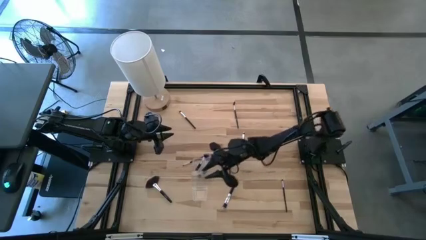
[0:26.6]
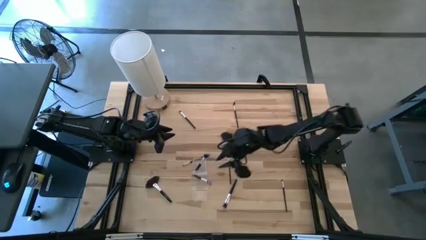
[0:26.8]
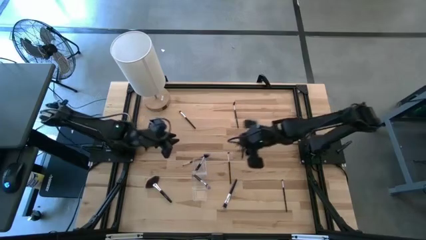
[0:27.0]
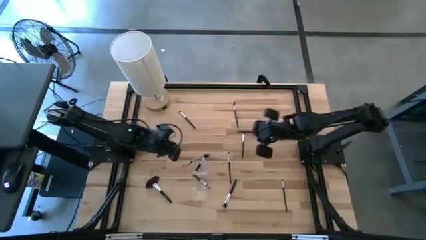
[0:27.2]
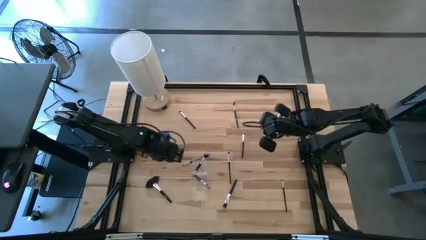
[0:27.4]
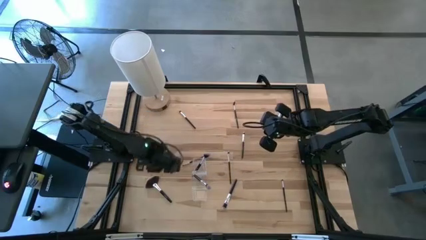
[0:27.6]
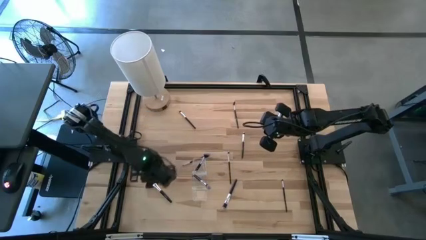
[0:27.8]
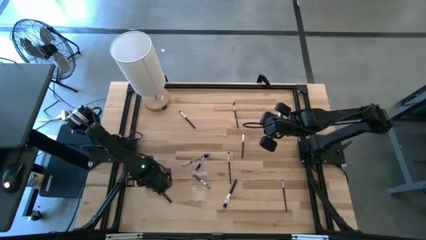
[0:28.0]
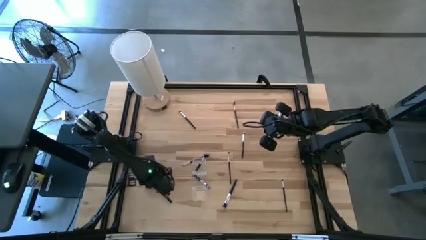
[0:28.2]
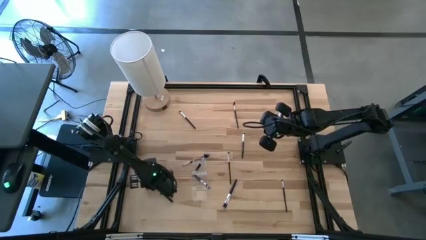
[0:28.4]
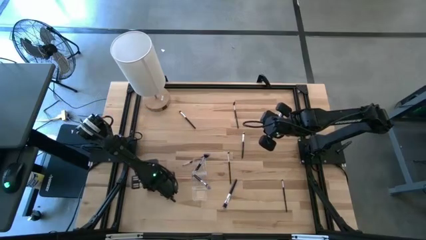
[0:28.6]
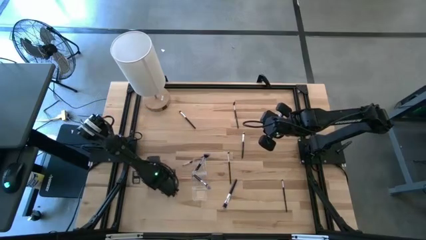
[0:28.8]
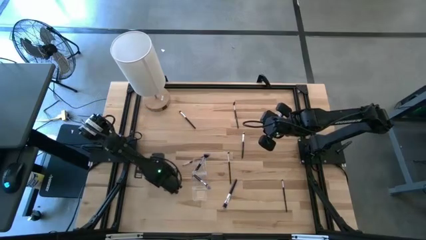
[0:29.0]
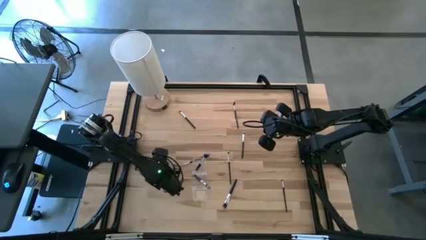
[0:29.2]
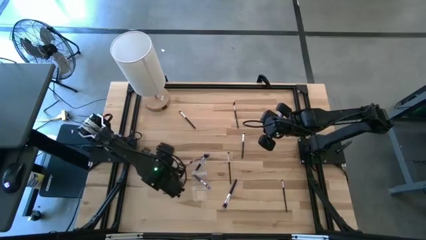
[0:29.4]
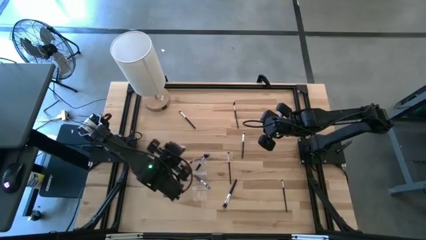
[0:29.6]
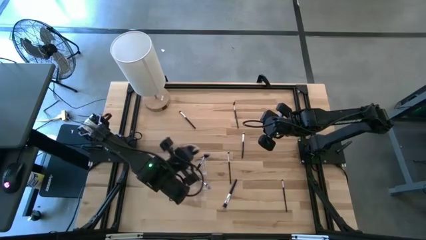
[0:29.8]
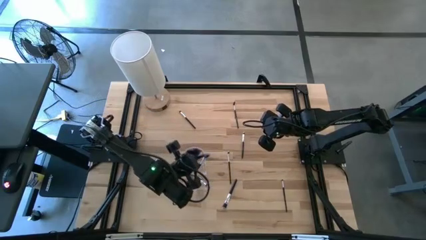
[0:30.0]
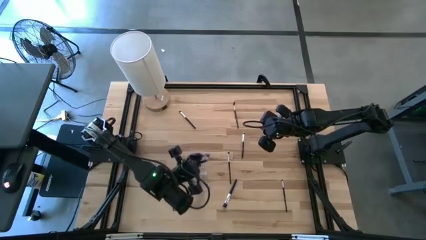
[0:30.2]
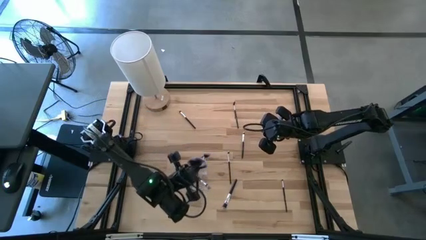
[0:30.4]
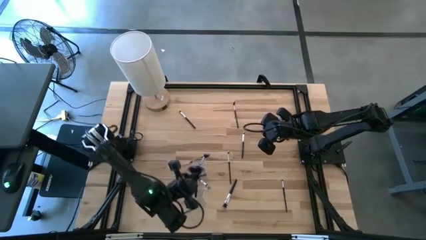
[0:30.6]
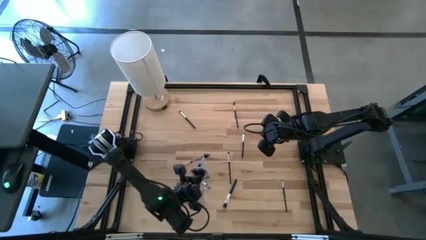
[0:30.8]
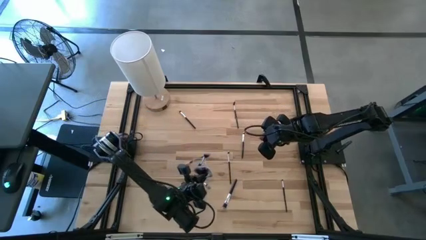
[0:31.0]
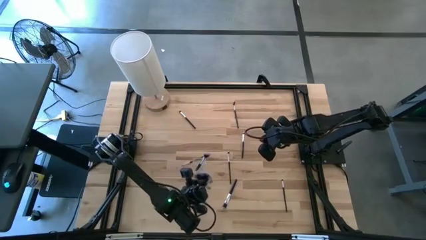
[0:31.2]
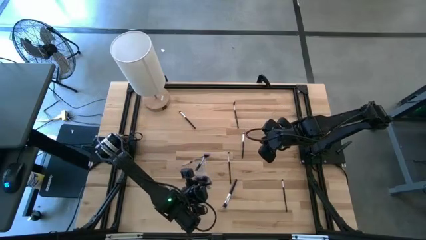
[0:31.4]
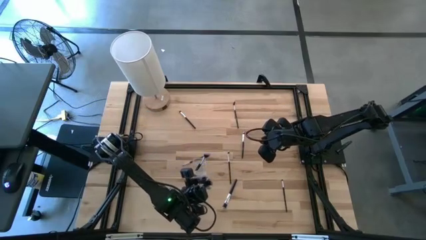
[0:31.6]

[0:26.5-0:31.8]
Task: Put items in baskets/containers
Put the highlighter brush into the transparent organizer

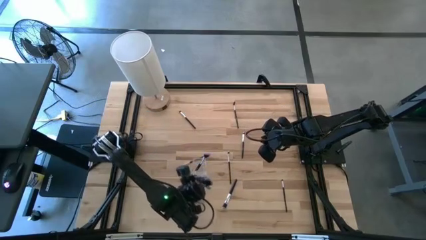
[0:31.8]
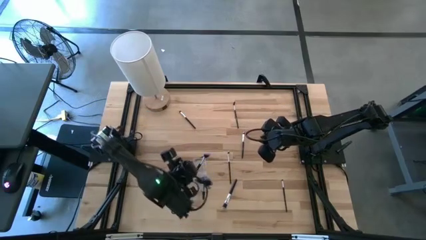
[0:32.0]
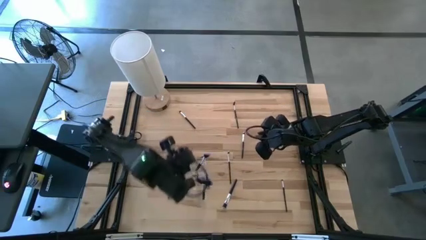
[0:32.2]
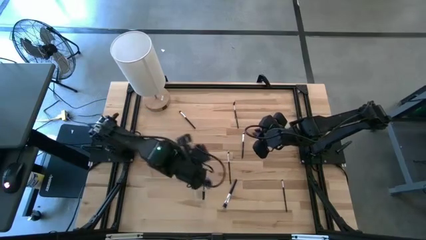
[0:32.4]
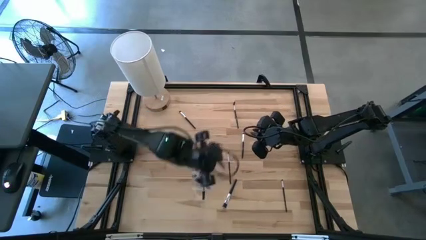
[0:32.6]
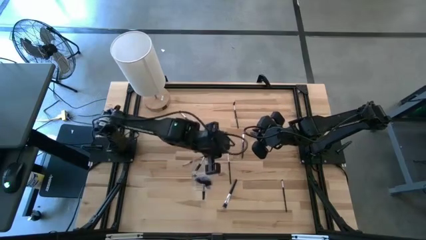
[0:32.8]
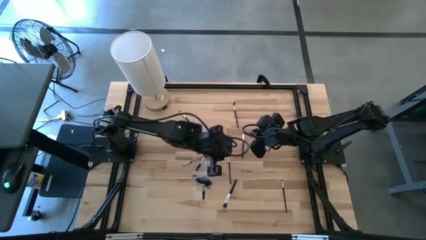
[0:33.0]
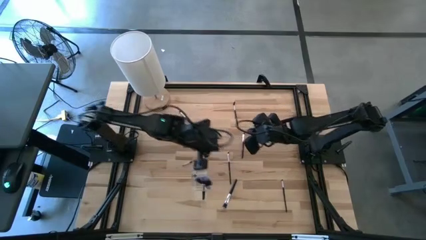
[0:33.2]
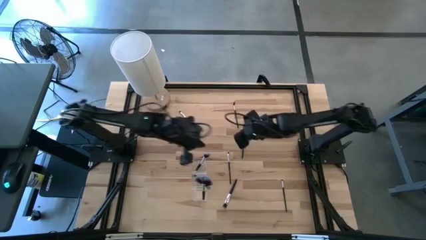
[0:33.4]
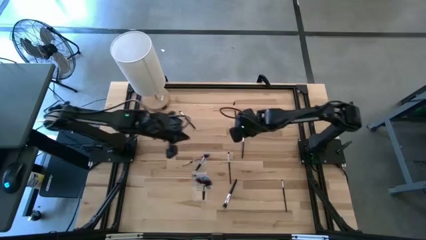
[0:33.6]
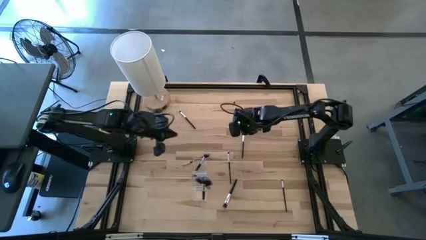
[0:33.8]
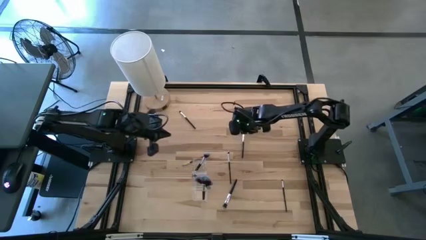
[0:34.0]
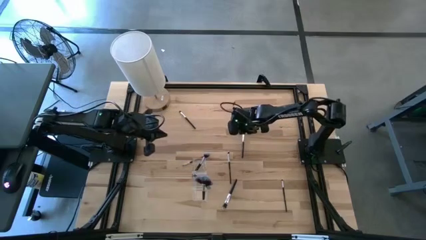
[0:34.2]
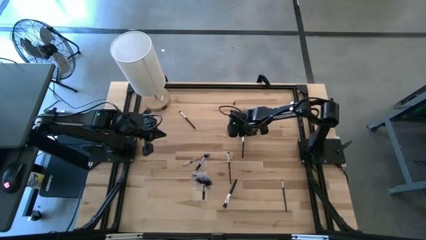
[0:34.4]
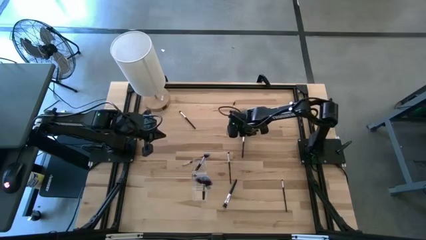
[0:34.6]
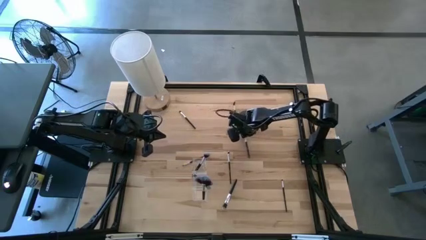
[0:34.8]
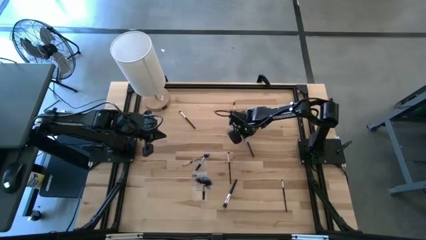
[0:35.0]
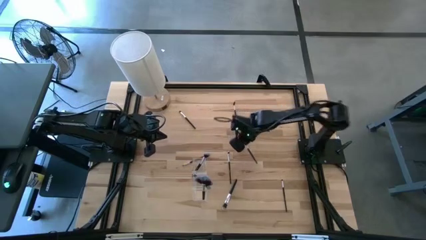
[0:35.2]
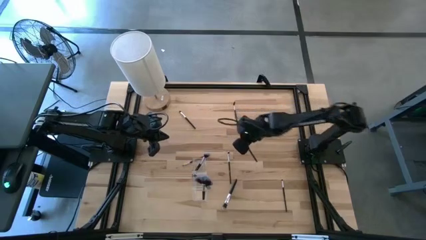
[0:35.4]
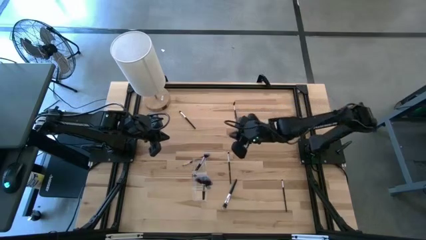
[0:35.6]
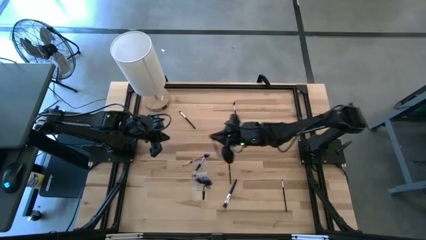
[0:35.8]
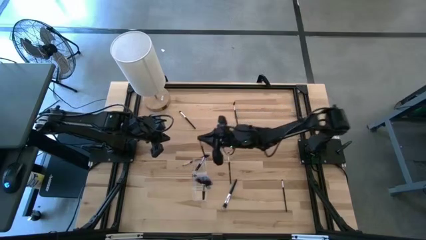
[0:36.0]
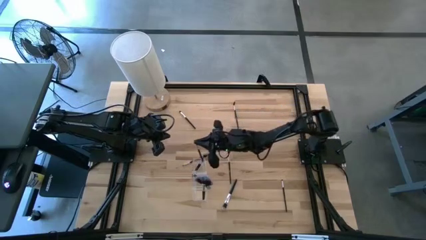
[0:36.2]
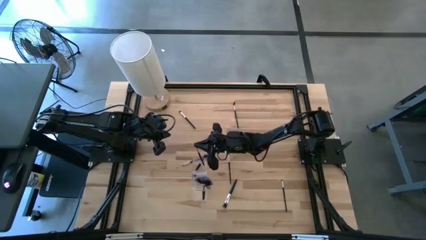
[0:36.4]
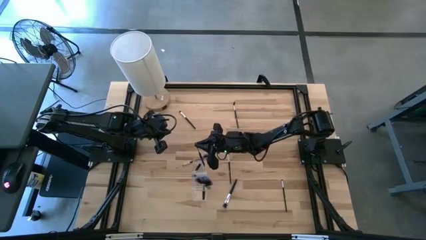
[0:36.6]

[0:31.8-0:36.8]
Put the foundation brush into the transparent organizer

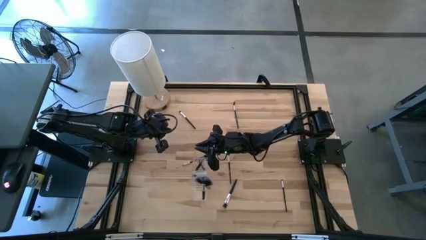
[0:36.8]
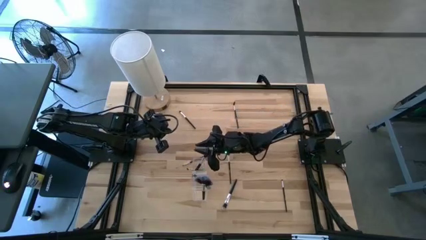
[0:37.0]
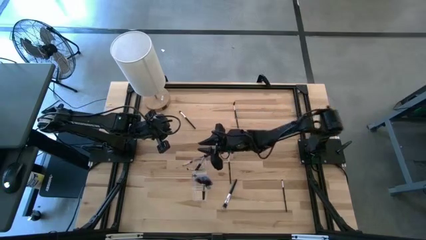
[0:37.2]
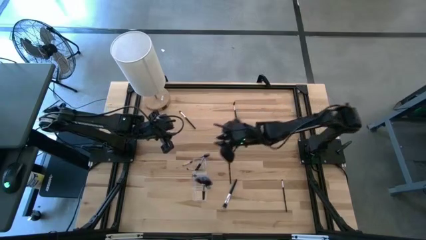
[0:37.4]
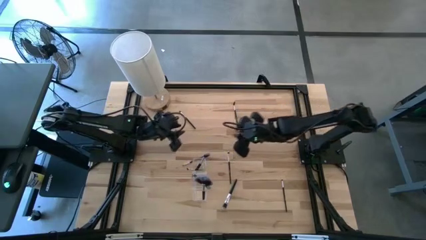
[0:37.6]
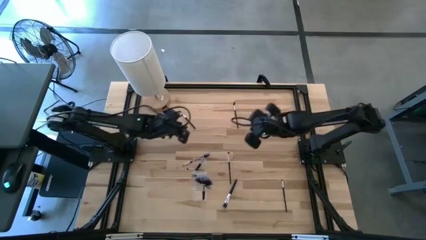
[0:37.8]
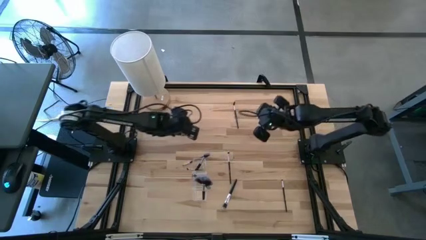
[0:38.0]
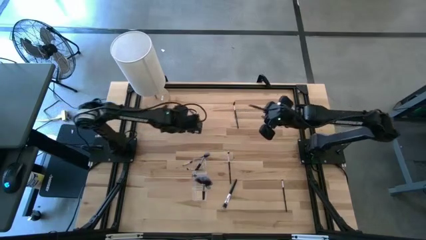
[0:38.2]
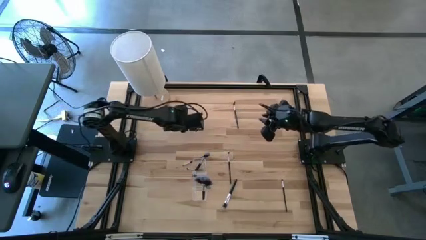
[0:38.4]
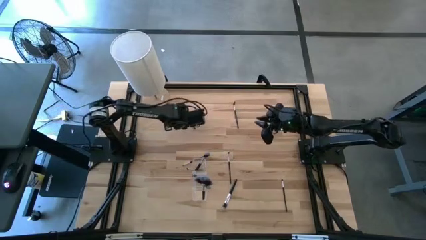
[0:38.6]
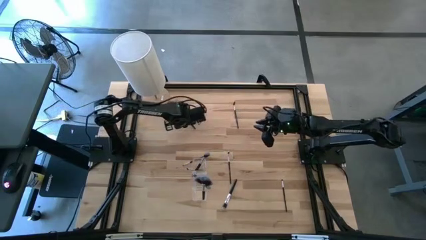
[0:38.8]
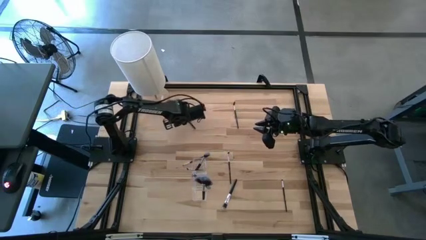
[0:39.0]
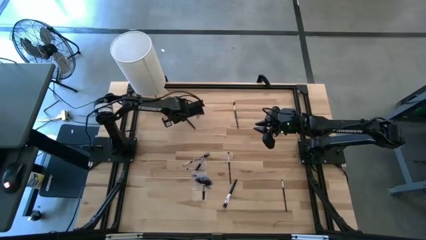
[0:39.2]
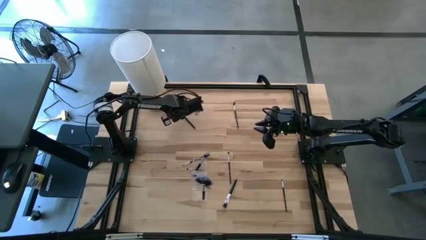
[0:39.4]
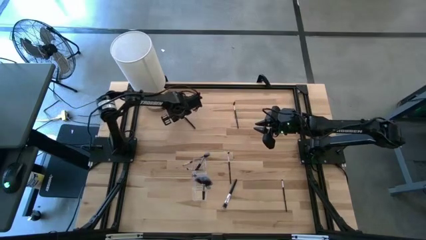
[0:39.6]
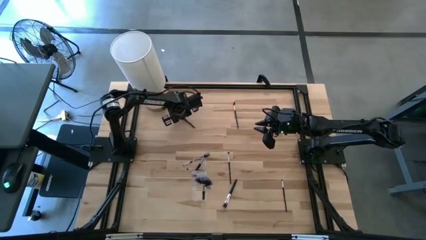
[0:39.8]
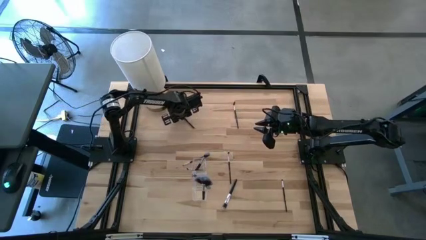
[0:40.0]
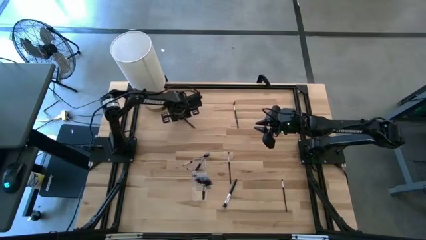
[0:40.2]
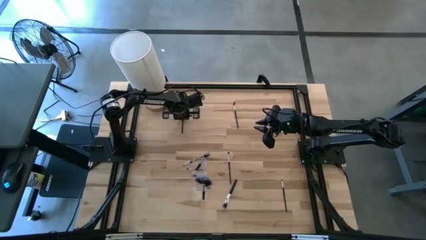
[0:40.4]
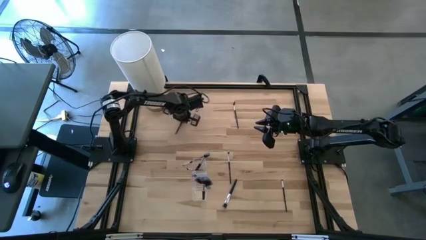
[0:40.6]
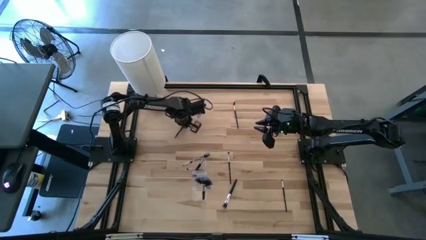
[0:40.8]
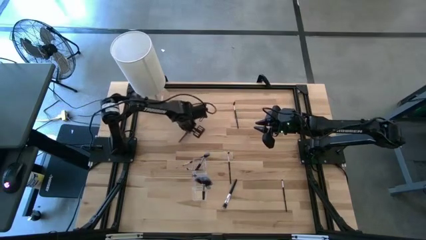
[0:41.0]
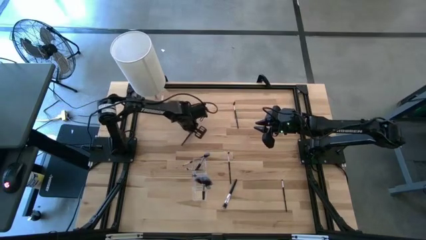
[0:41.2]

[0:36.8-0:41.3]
Put the foundation brush into the transparent organizer

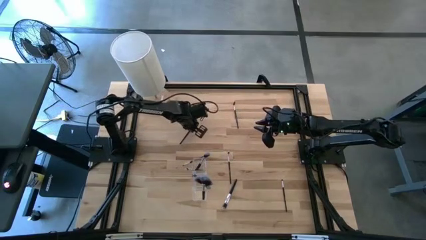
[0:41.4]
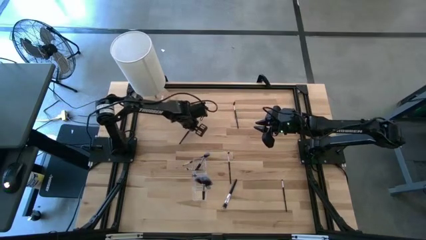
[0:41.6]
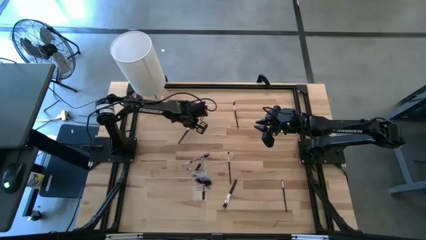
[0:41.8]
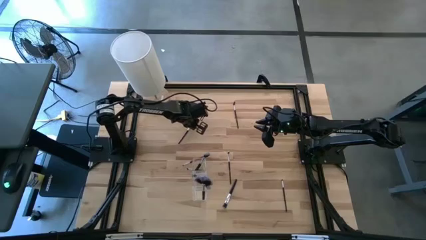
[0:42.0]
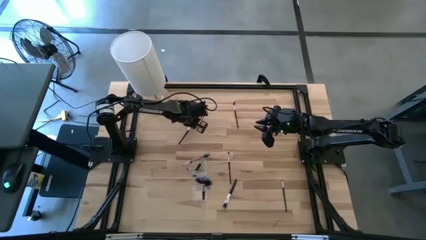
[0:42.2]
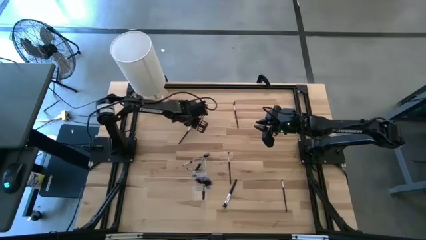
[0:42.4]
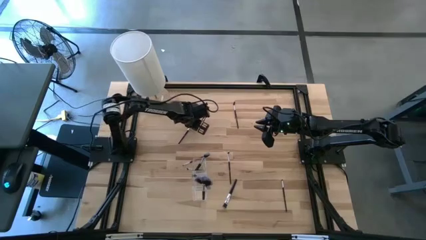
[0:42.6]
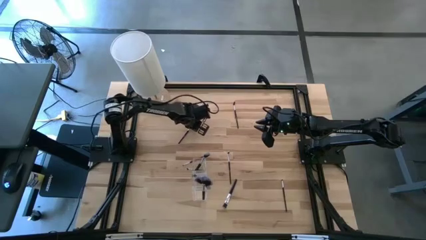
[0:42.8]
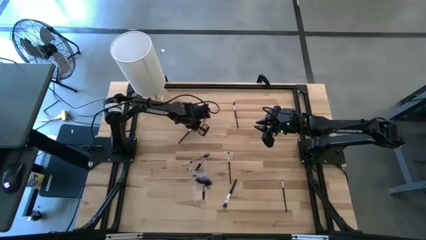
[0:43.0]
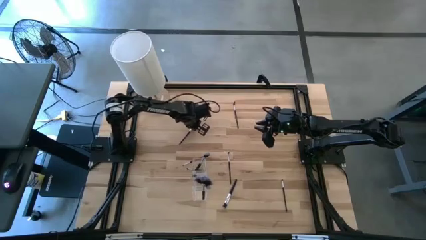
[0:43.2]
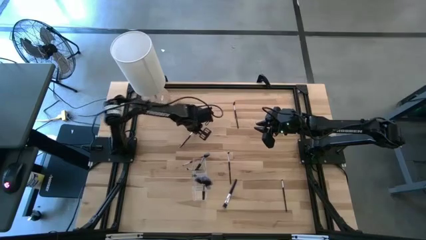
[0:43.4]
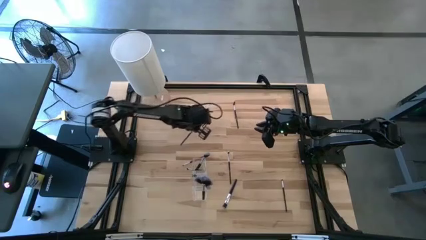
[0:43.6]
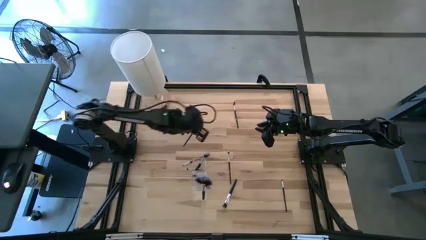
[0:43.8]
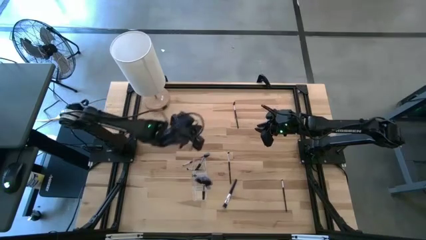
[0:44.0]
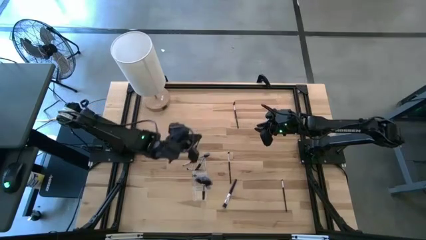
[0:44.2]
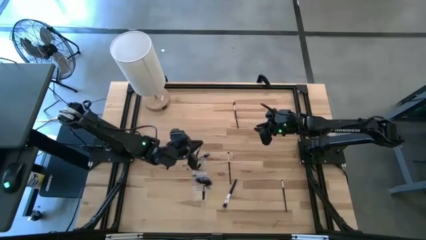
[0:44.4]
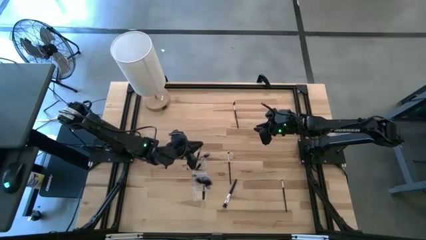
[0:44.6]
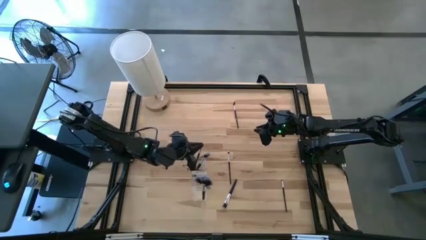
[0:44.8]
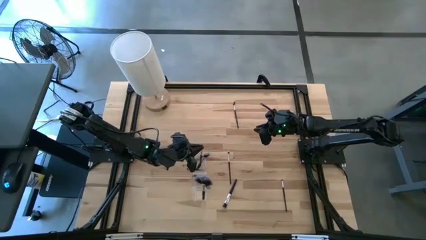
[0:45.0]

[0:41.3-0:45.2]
Put the foundation brush into the transparent organizer
